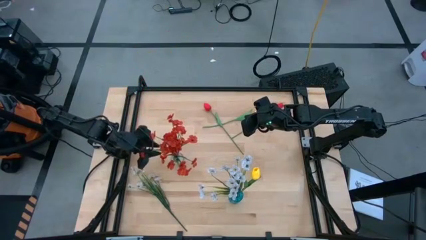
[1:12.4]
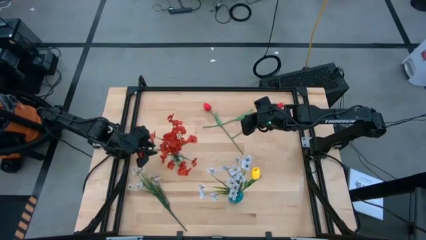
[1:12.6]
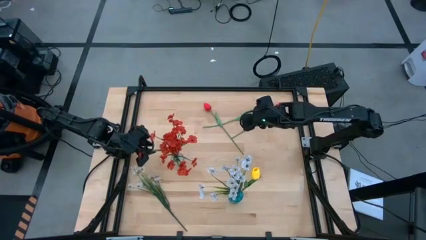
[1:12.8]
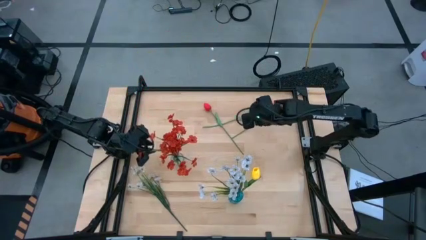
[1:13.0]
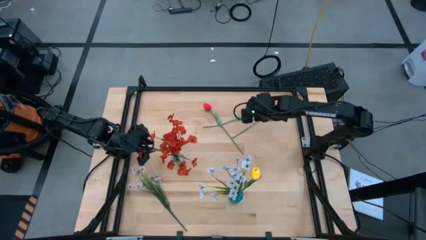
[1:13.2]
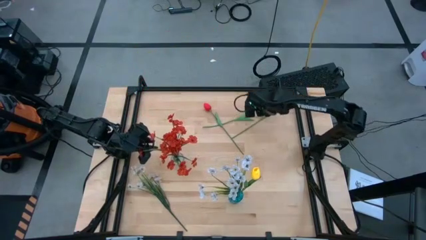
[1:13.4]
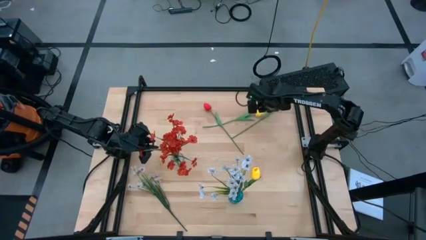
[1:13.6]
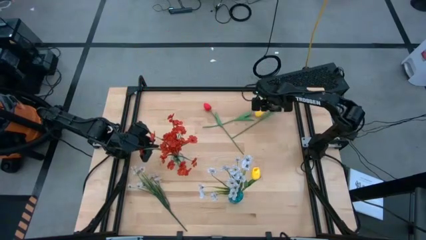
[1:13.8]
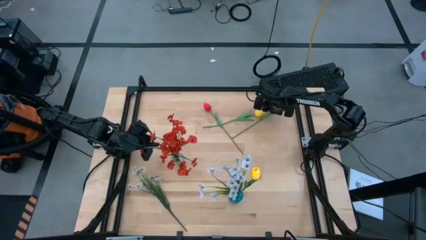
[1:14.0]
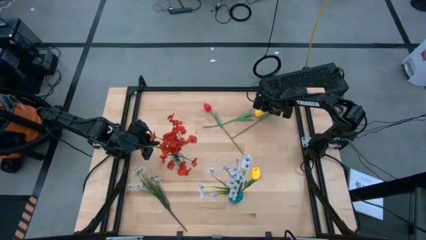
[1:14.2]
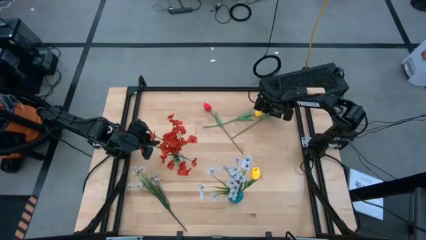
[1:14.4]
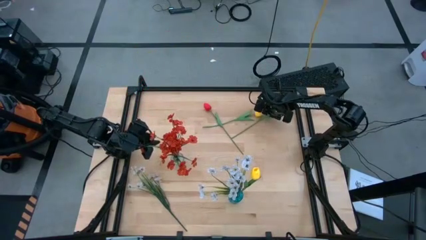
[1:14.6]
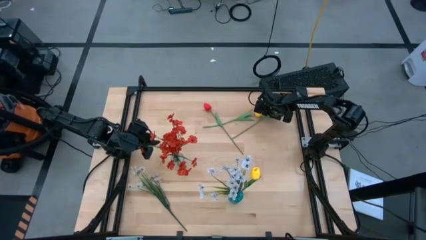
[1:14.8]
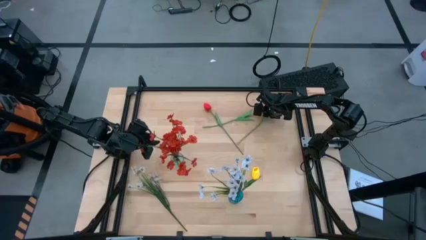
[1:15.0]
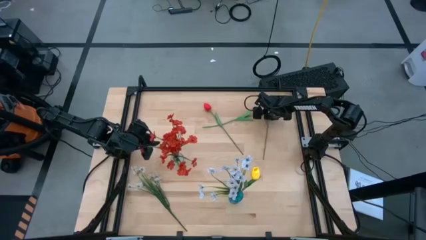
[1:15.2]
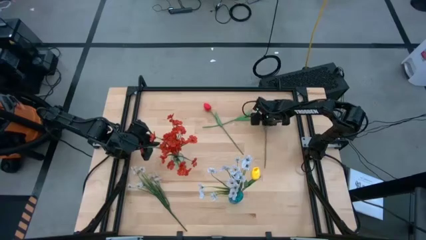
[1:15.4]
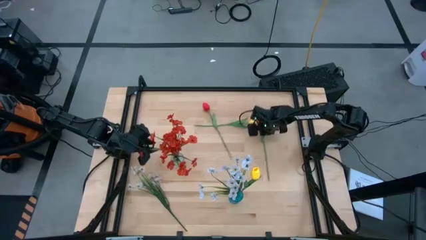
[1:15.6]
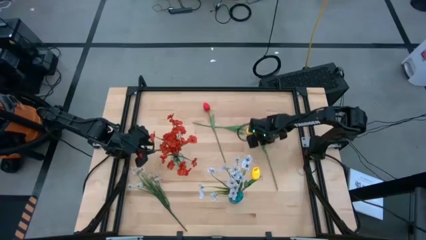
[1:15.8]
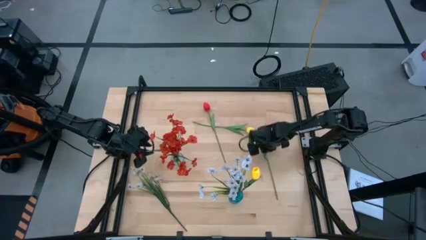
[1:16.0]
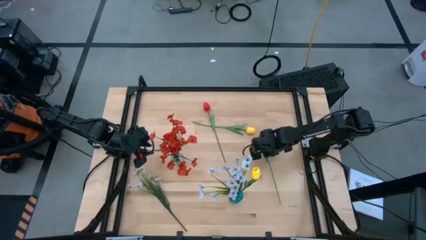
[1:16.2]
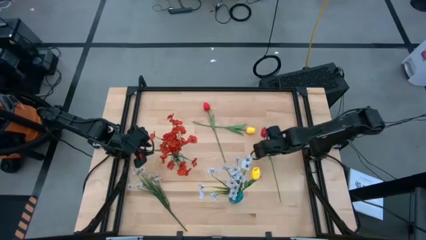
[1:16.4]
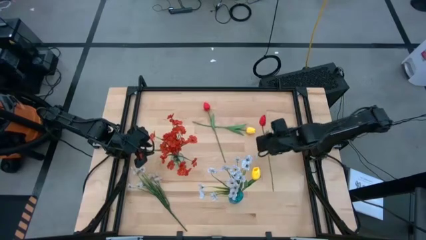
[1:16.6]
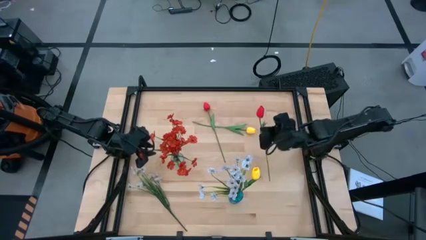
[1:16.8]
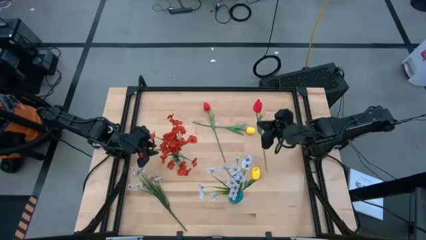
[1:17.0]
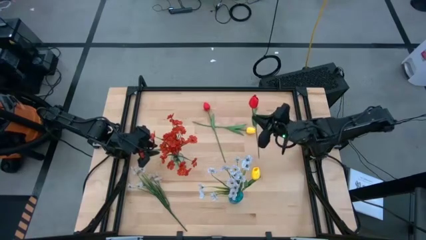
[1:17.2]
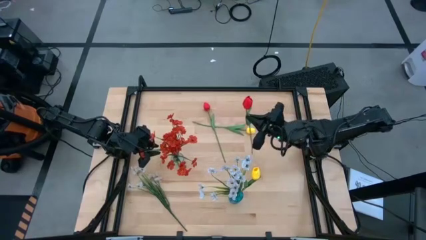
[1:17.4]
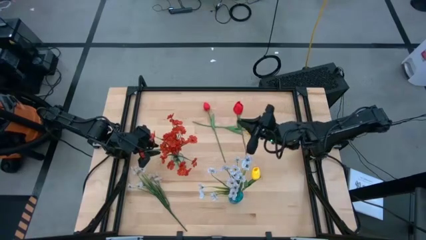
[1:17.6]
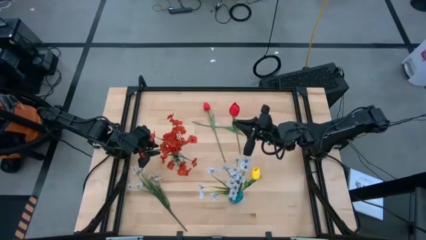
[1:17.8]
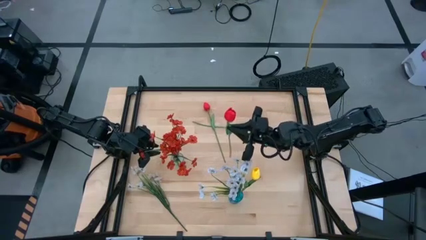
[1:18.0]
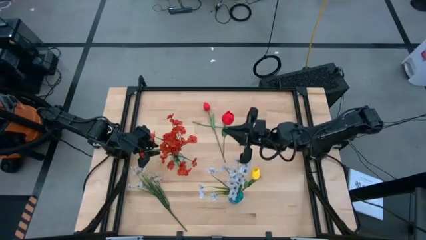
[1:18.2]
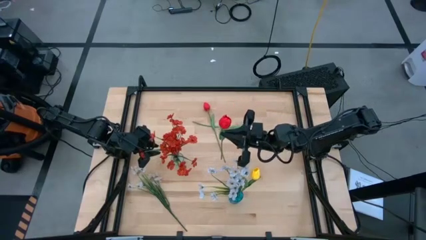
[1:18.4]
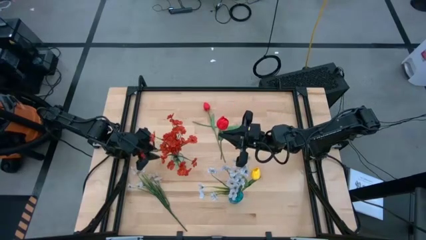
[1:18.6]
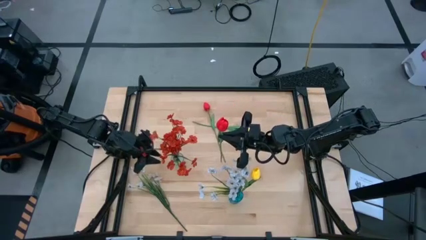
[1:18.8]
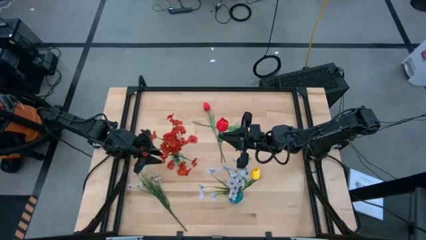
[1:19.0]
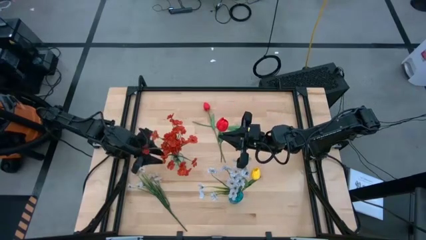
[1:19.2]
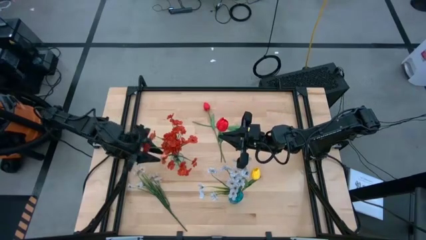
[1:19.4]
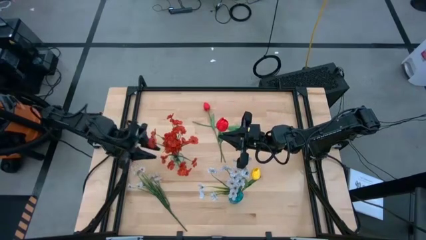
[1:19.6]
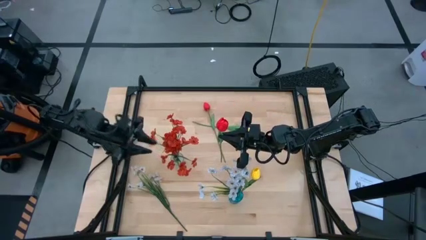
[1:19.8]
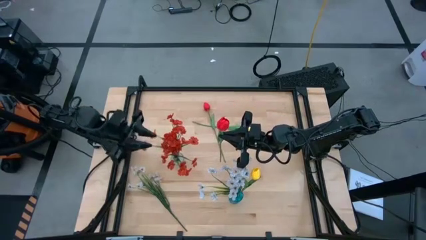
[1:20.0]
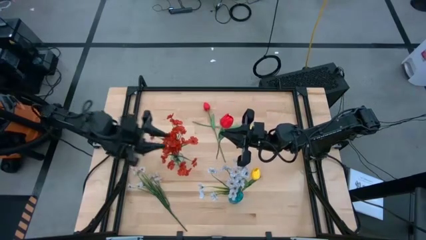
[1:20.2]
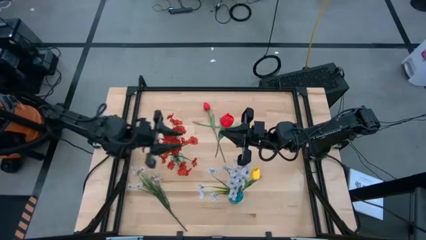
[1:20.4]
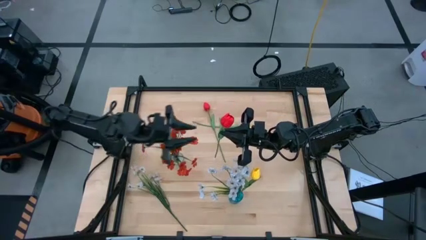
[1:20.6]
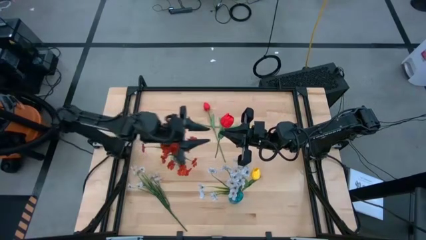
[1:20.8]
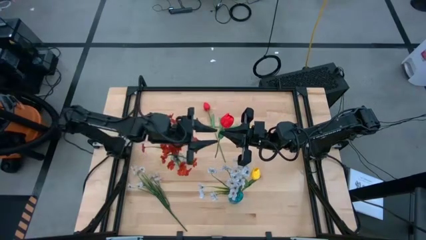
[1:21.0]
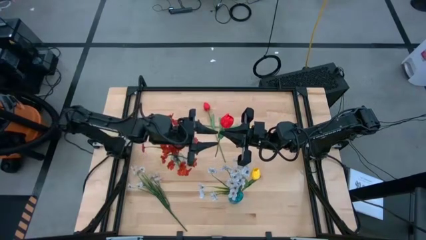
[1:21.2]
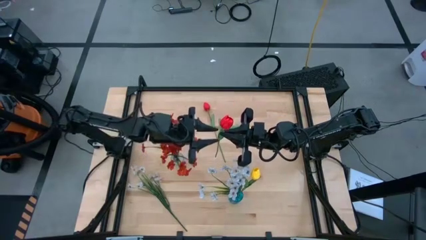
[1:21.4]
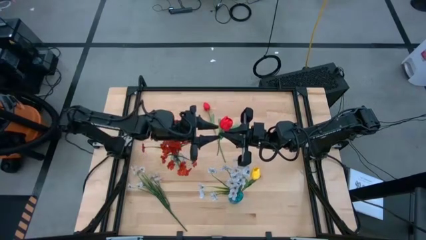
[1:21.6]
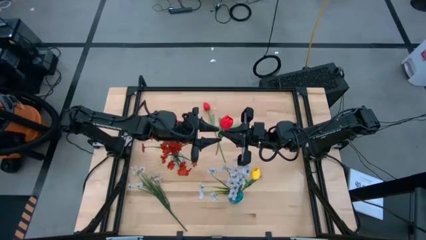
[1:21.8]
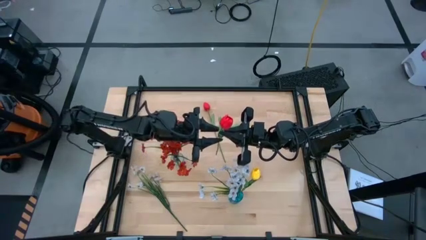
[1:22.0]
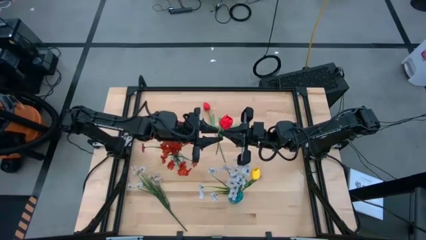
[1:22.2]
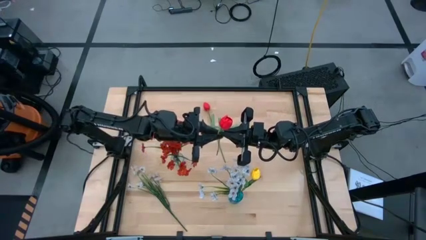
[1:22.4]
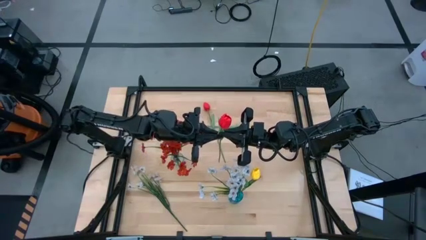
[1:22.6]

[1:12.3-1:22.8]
Task: Sort flowers into vase by color
Put the right red tulip into the transparent vase

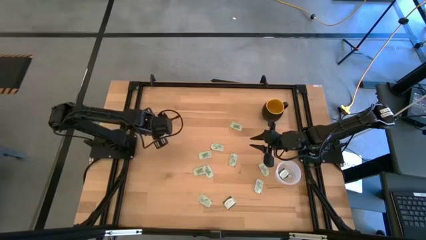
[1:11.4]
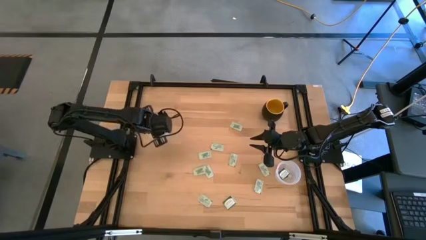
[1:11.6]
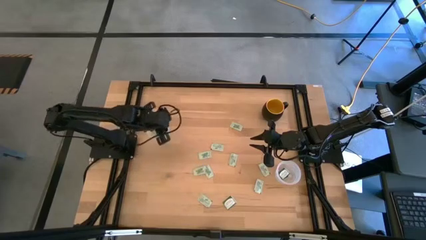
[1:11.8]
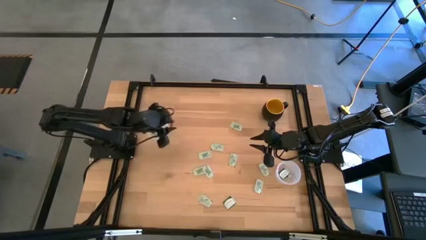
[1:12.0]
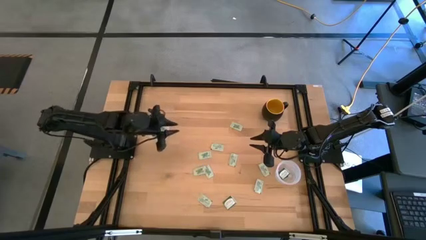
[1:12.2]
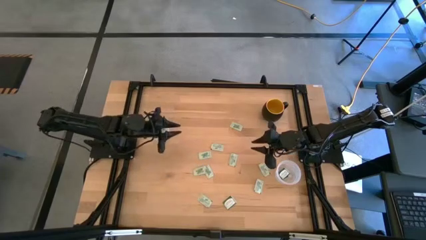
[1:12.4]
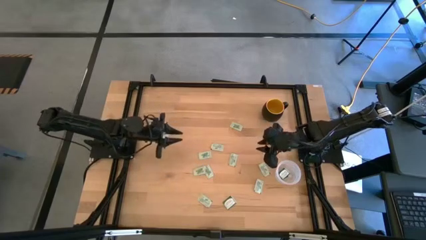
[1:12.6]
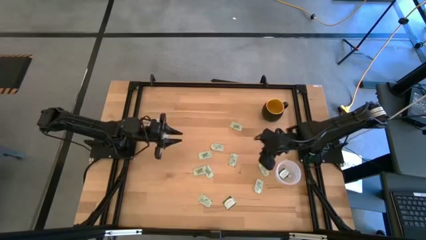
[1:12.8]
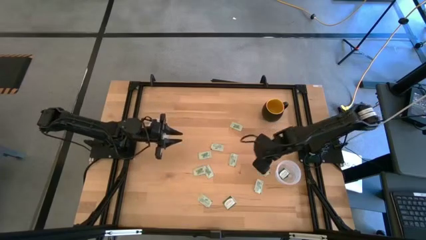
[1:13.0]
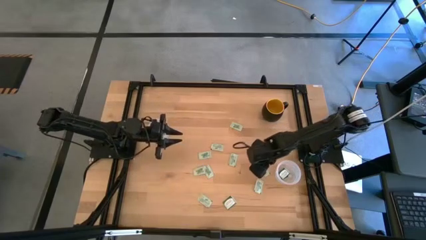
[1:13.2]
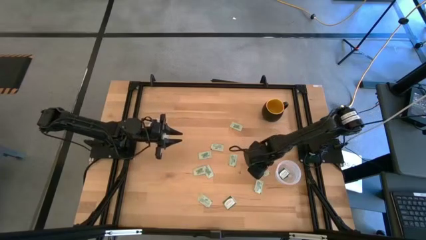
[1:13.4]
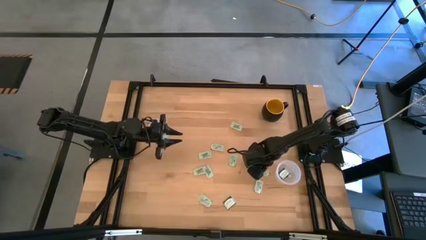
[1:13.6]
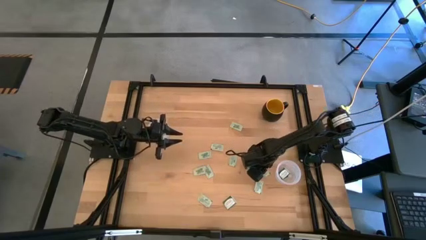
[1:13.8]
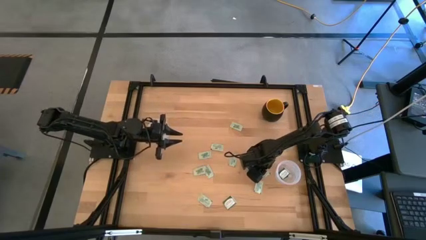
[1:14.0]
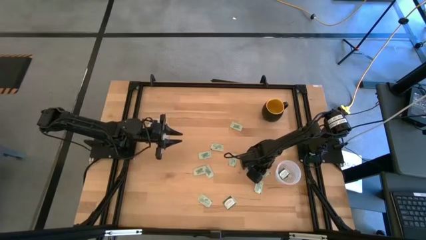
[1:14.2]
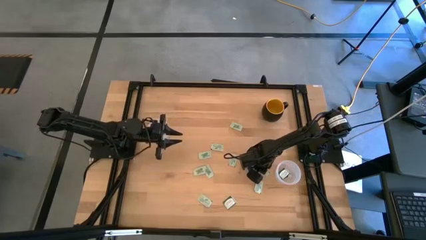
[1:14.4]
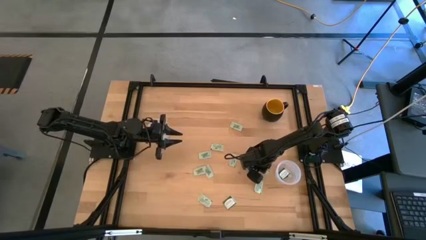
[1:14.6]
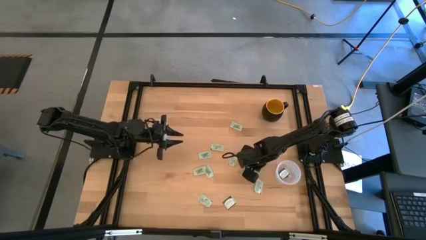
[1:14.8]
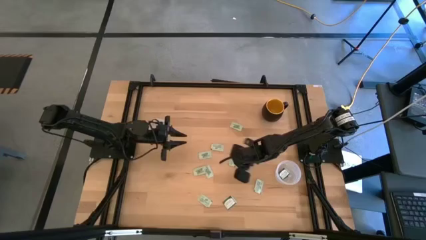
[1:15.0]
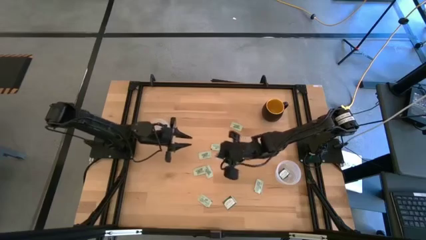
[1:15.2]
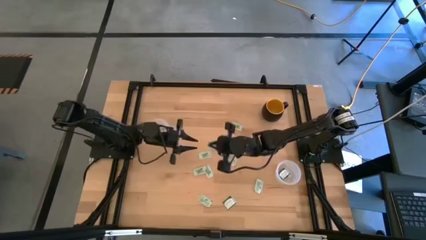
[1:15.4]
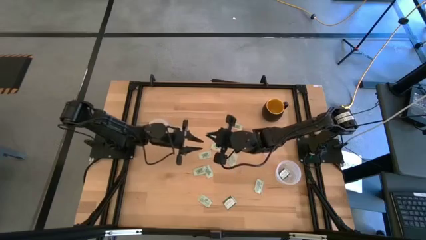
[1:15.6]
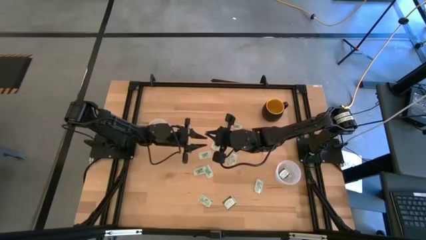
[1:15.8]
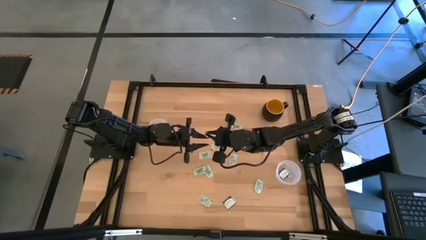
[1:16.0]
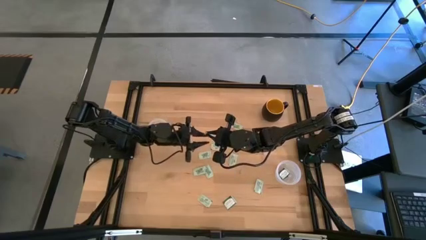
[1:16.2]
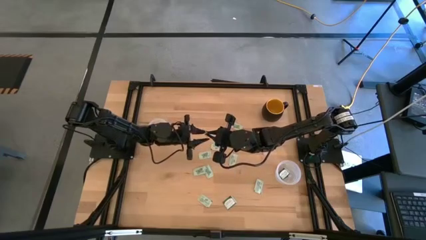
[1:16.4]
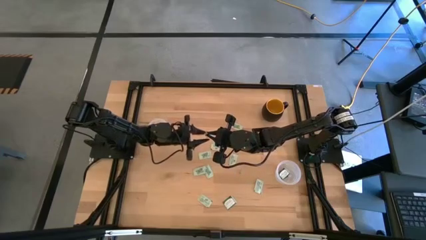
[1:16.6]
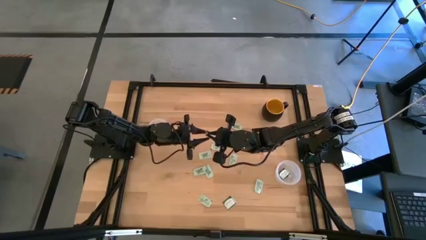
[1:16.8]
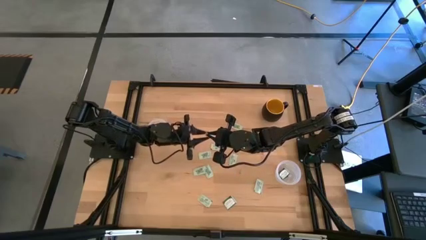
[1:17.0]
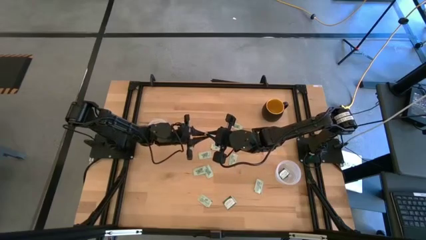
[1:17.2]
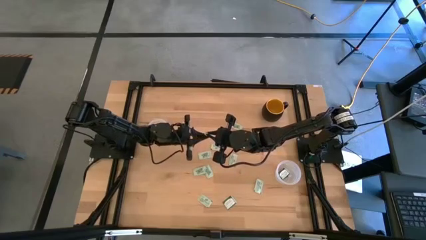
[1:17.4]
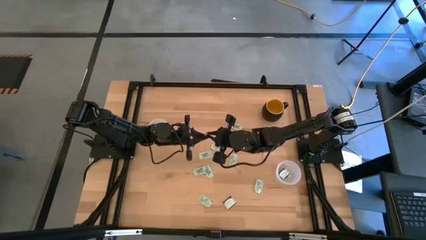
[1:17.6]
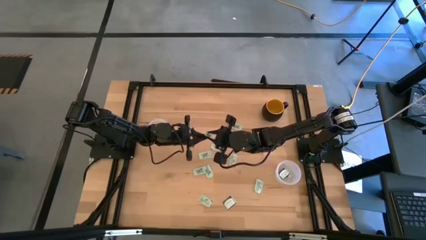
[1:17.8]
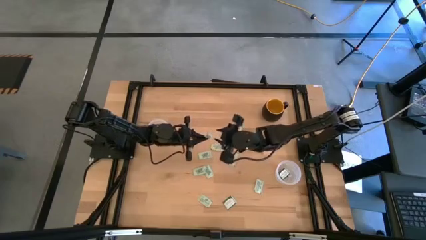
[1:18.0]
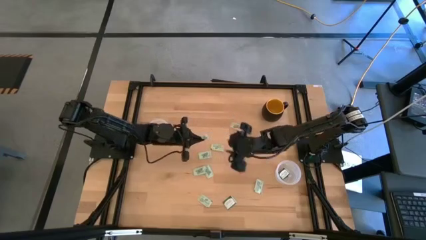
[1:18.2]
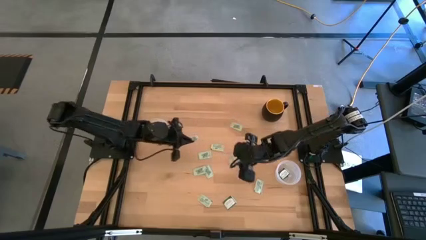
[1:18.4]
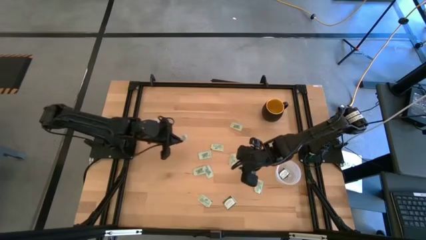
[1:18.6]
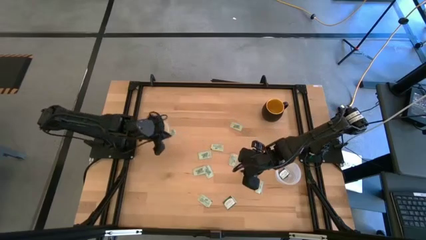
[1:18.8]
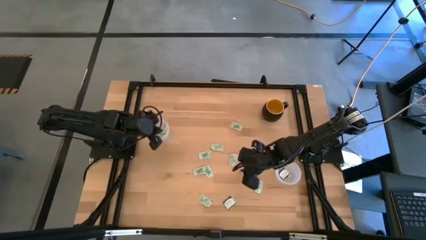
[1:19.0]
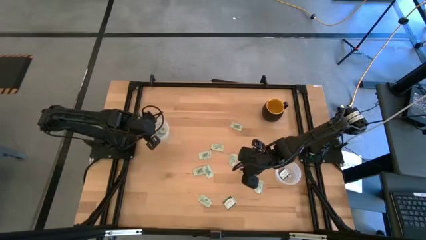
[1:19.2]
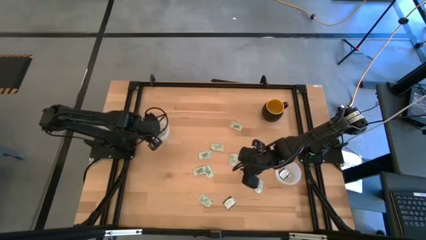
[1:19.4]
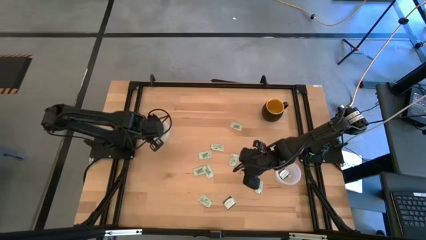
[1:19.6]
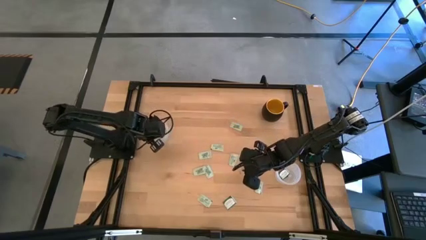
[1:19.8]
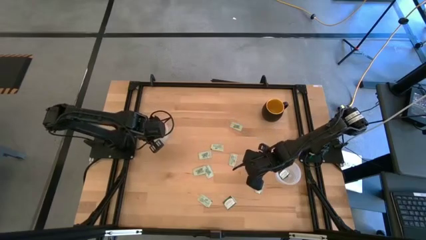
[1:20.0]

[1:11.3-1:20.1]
Task: Pick and place Stevia / Truvia into bins
Put the white stevia packet into the left transparent container
